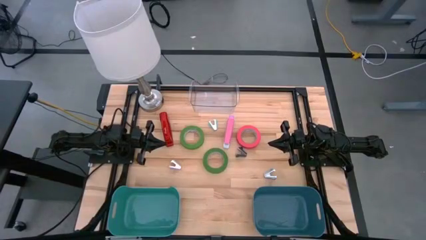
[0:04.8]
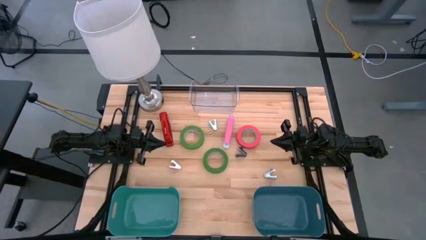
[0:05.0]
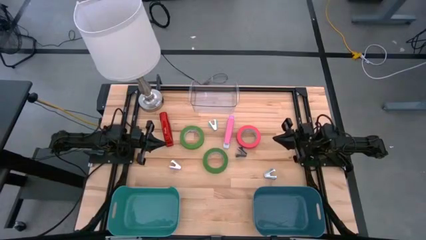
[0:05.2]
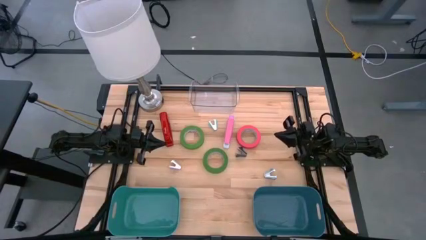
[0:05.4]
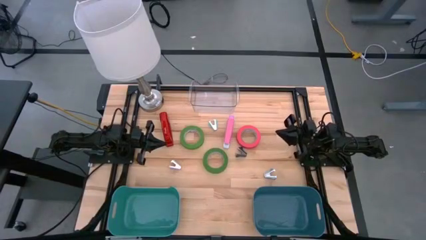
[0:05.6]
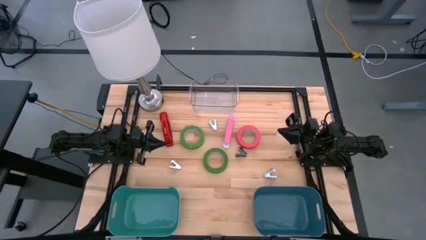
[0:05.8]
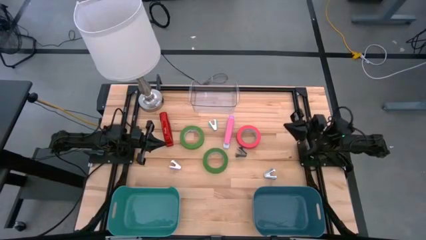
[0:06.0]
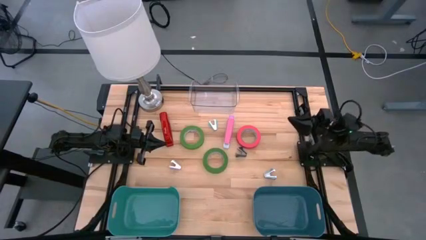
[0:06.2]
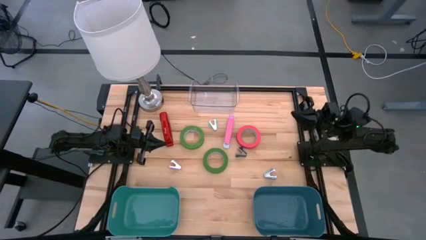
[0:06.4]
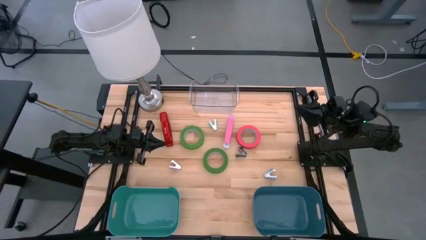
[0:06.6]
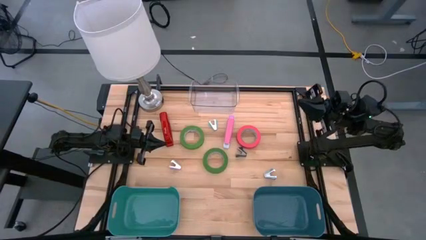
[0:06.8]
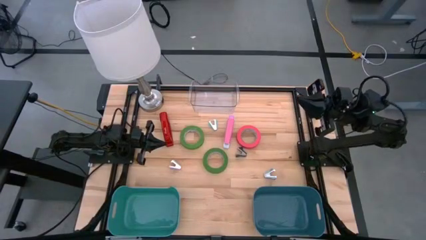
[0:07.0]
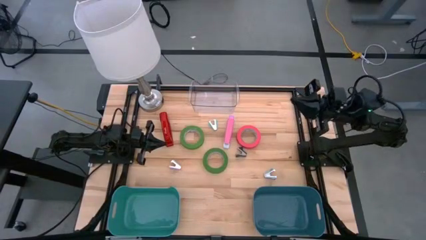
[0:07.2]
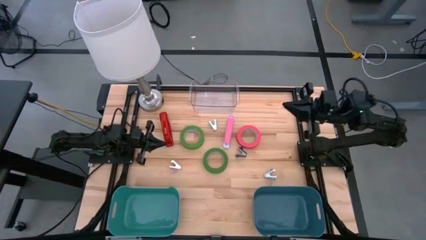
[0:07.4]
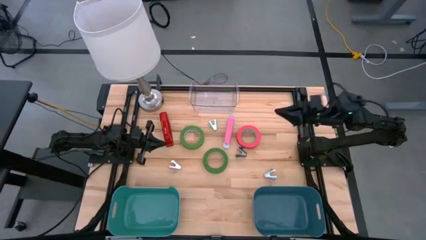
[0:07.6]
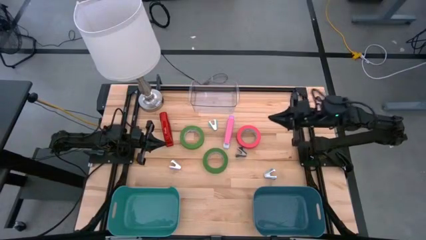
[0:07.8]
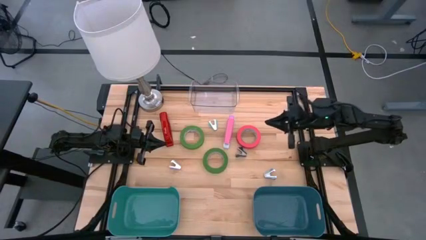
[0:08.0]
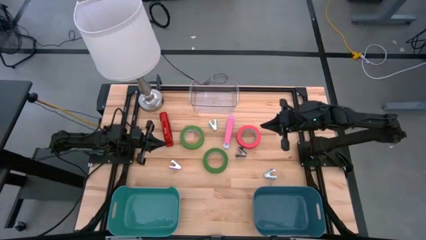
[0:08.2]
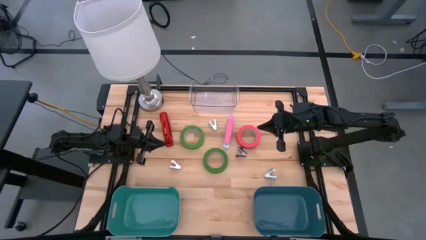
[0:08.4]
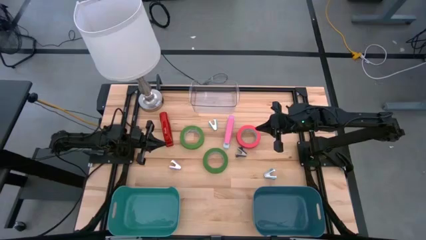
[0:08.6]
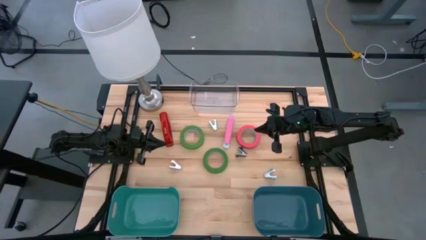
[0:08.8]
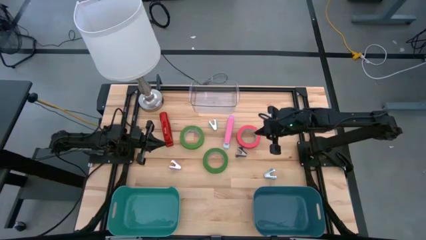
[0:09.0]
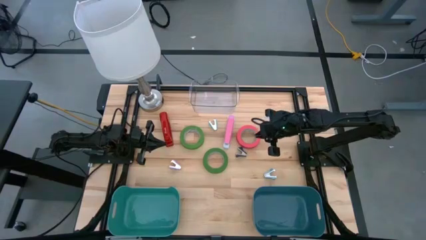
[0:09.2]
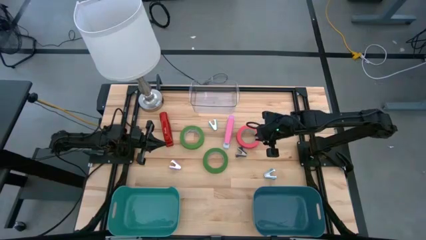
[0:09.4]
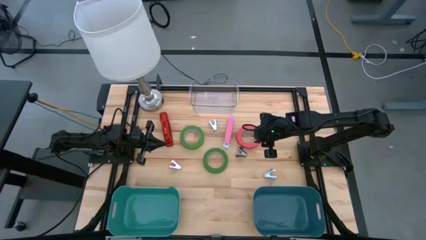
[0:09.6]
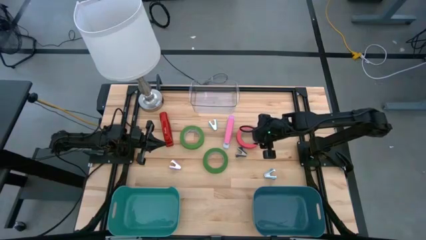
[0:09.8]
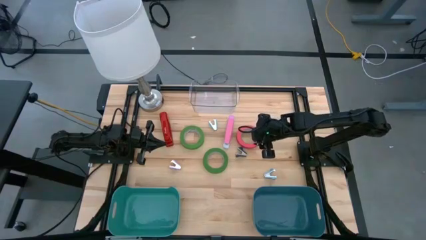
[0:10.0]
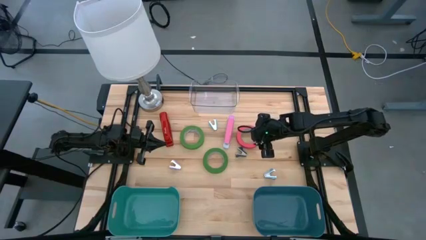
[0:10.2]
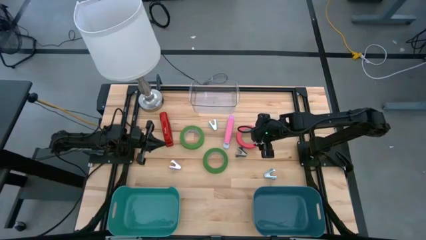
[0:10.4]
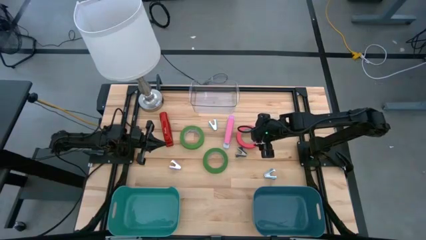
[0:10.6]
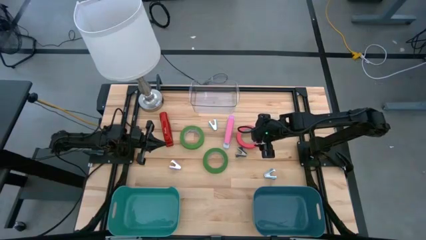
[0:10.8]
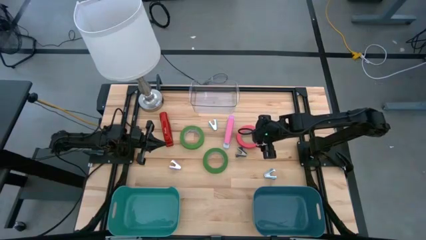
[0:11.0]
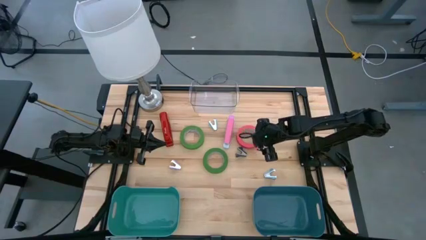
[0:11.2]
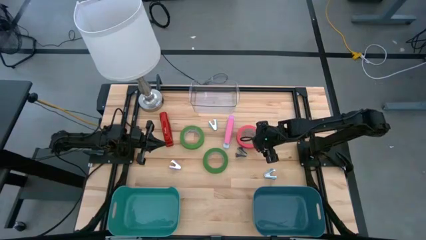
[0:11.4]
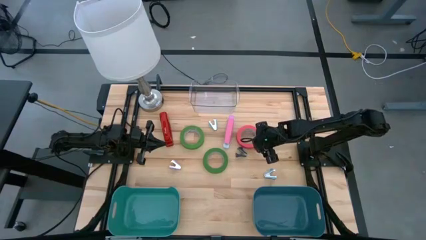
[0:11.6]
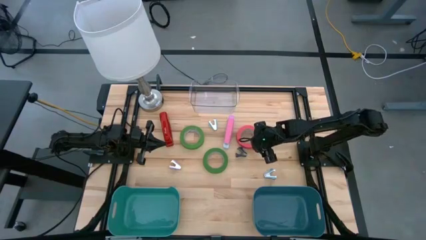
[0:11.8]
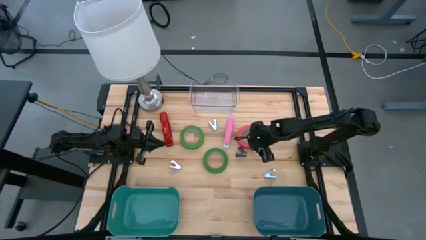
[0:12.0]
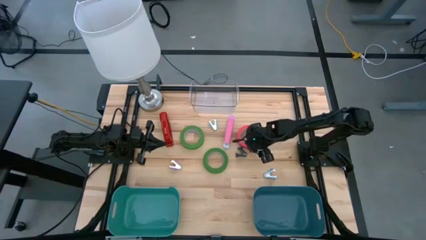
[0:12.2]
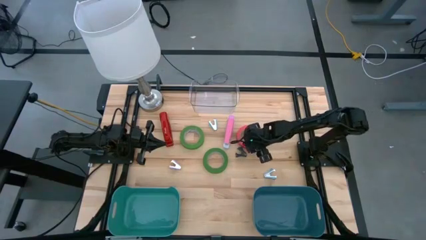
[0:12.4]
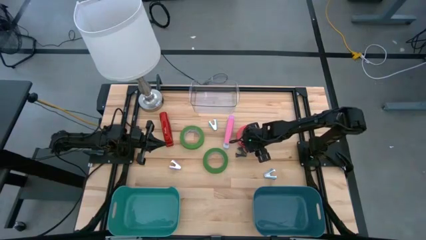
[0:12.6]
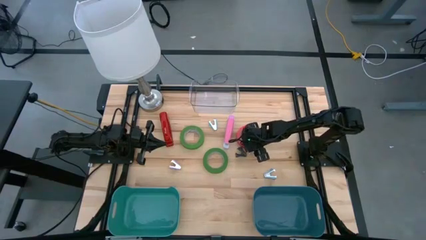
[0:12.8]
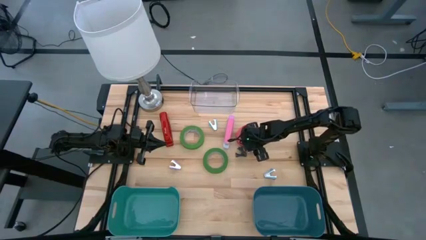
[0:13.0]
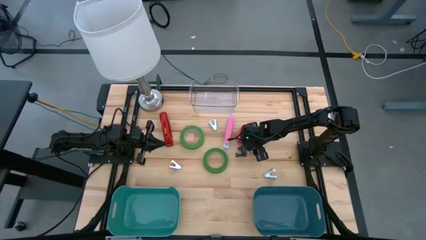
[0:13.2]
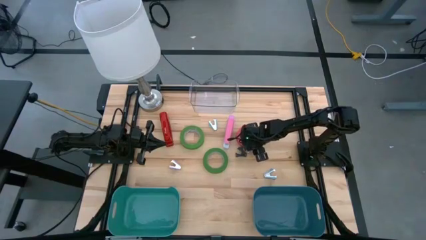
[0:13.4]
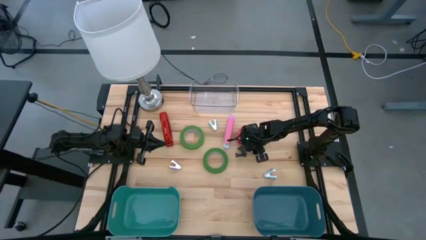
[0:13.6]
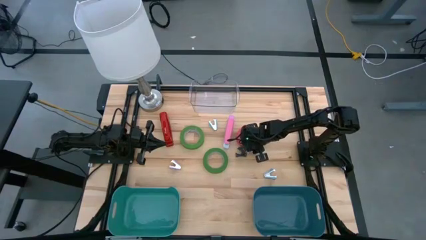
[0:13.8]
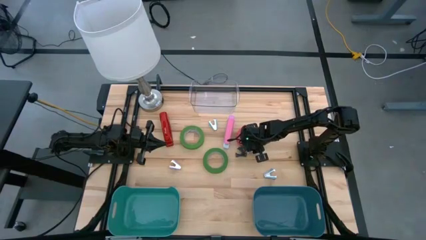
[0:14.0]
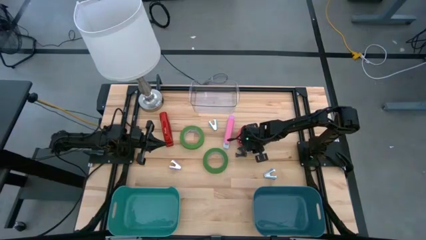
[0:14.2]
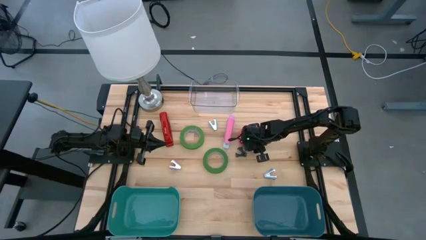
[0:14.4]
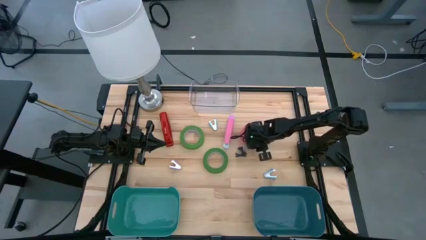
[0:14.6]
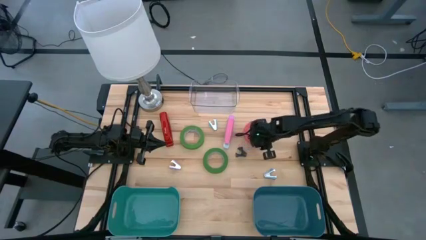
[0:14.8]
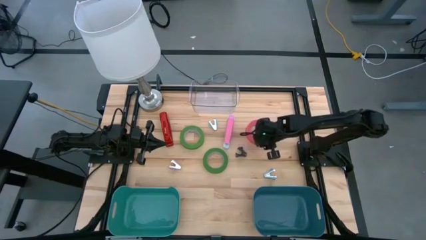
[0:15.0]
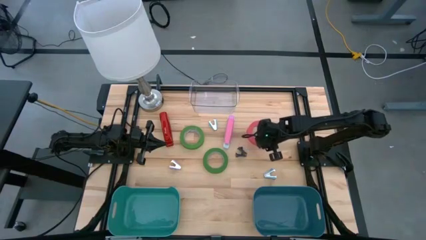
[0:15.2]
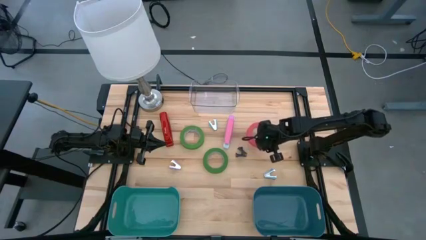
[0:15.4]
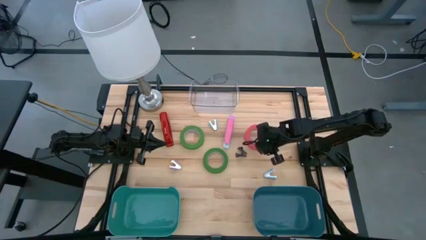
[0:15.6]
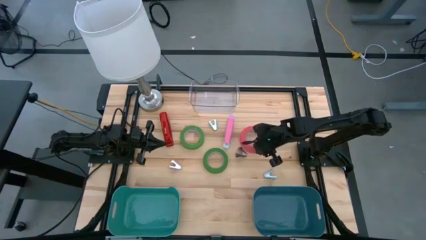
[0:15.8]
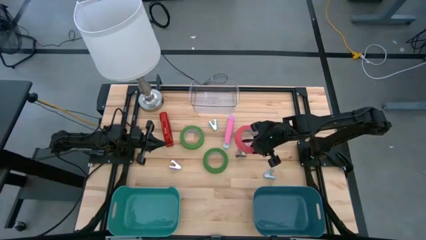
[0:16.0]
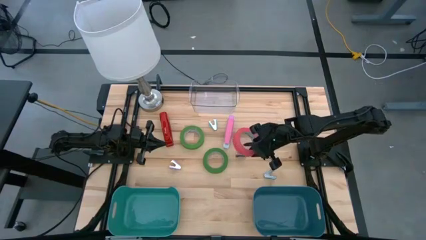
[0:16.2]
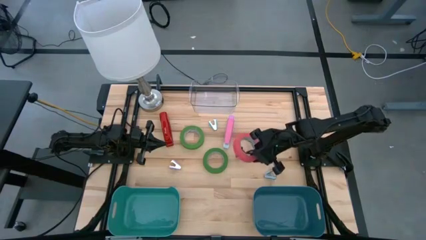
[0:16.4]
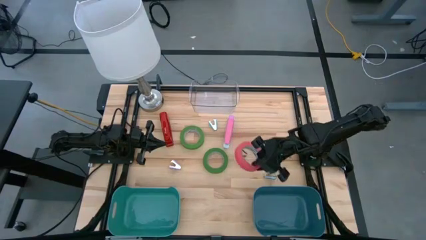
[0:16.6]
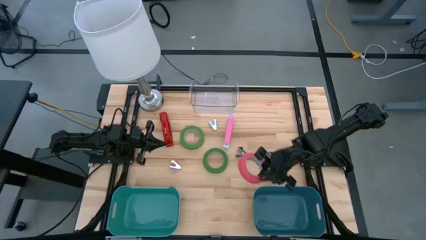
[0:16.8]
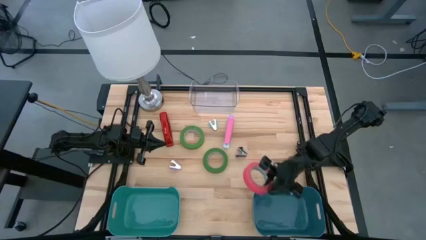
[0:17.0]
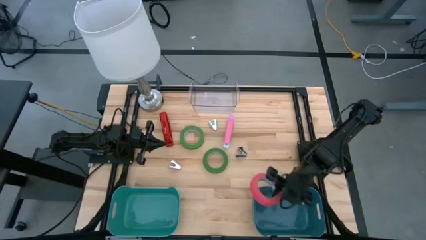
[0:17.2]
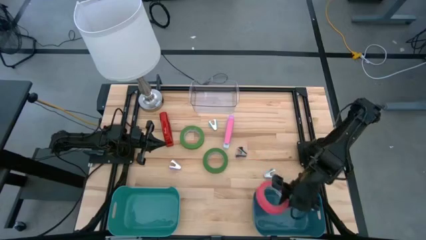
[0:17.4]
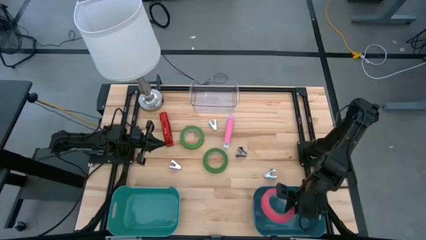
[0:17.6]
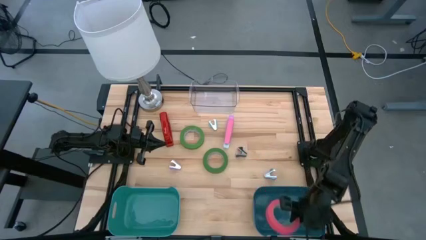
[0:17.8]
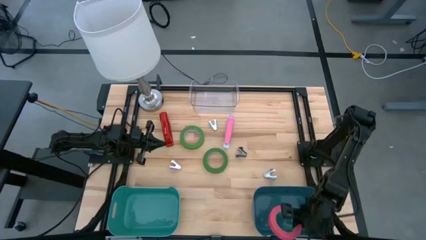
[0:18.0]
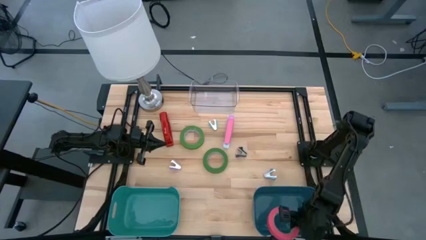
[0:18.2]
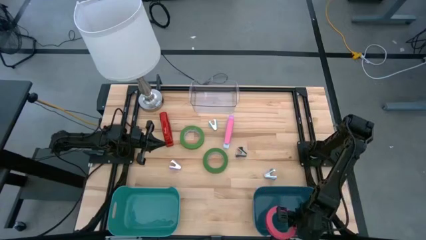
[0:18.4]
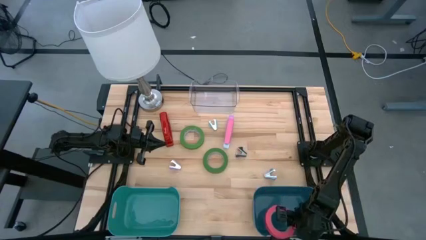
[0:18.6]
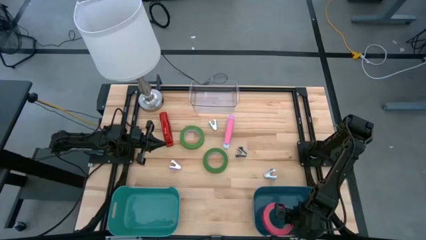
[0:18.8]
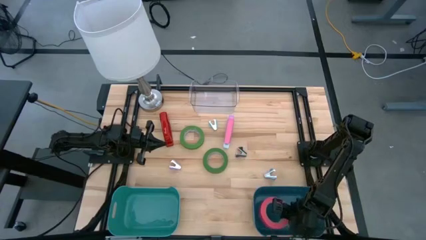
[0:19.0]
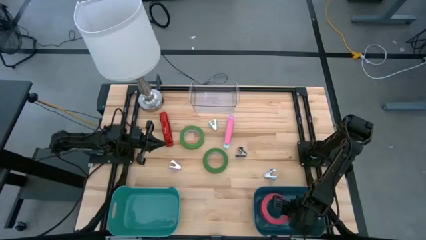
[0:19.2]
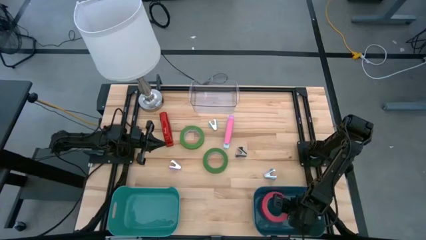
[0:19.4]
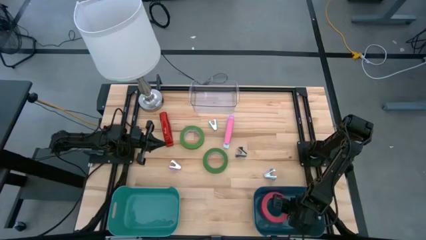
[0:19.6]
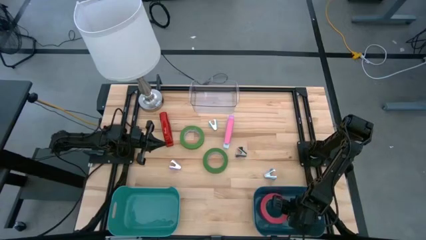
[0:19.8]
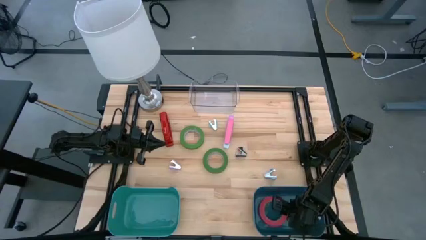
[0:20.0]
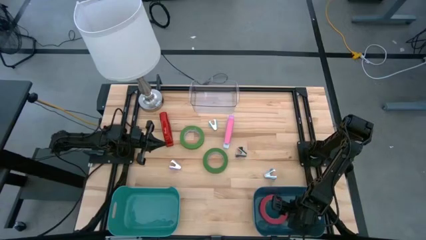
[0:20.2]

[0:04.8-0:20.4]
Task: Pick and place Stapler, Stapler remover, tape
Put the pink tape into the blue bin
